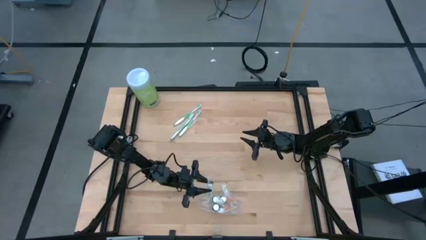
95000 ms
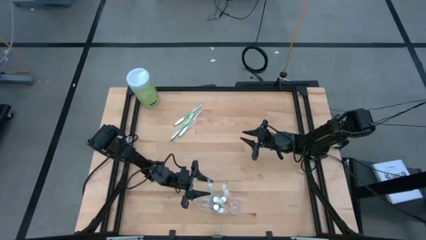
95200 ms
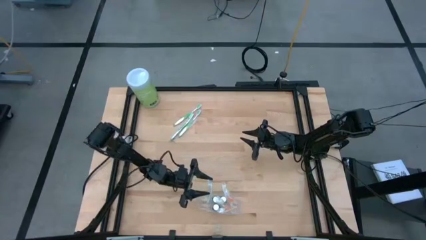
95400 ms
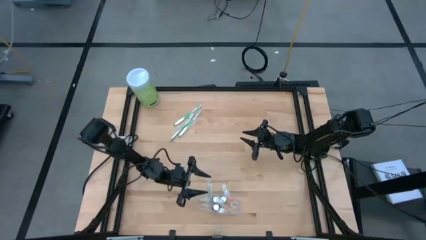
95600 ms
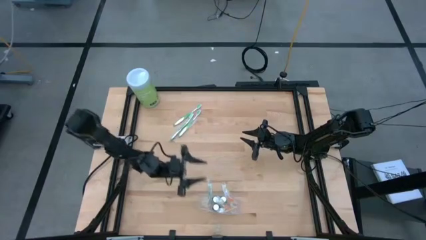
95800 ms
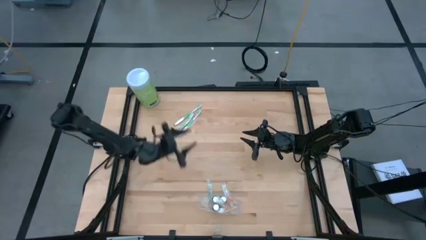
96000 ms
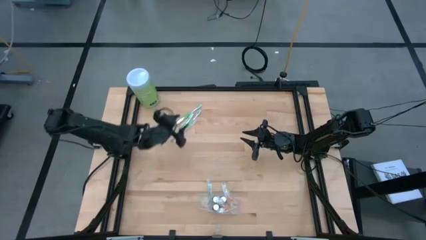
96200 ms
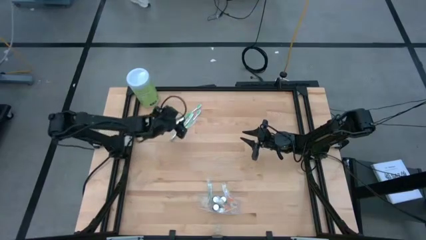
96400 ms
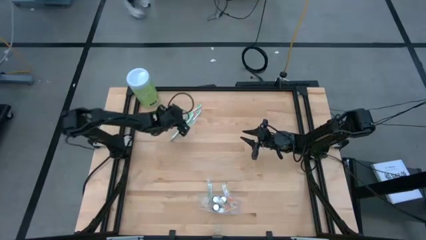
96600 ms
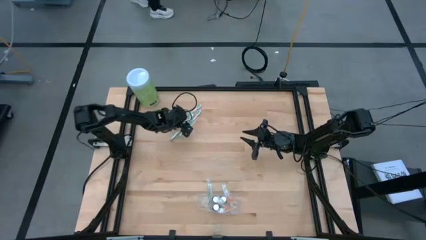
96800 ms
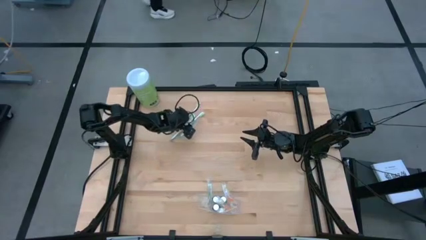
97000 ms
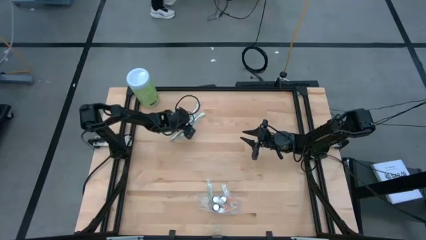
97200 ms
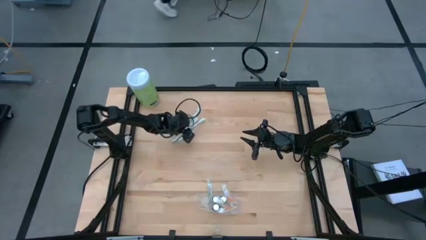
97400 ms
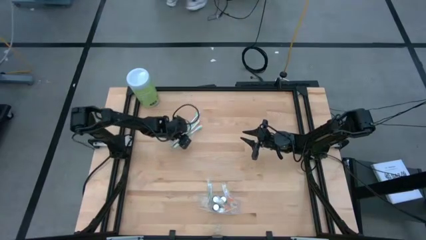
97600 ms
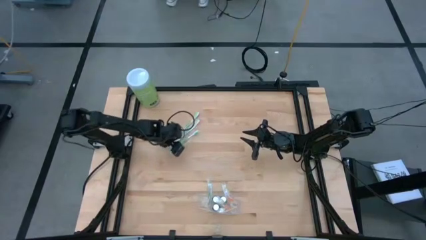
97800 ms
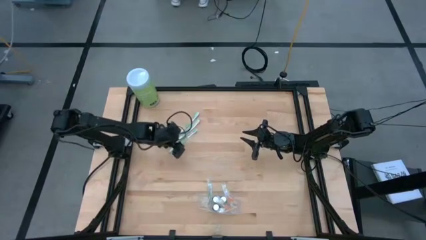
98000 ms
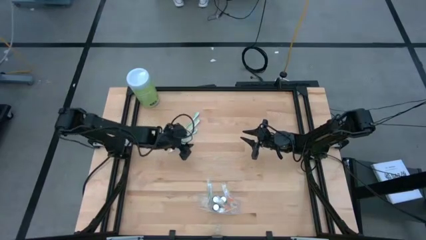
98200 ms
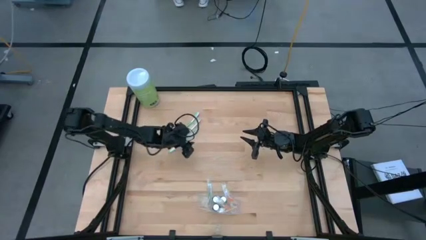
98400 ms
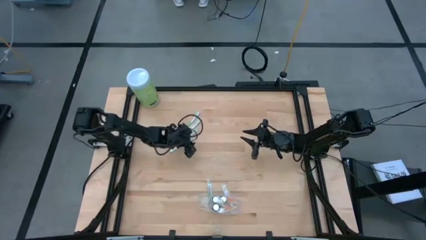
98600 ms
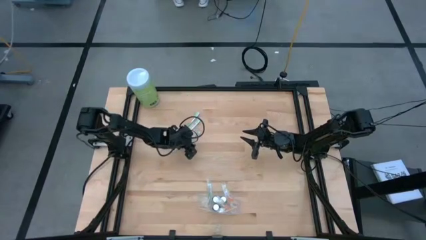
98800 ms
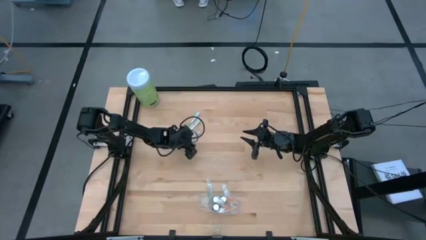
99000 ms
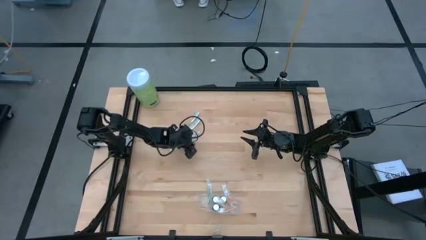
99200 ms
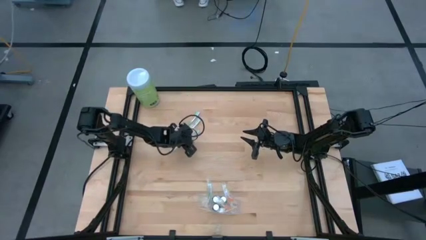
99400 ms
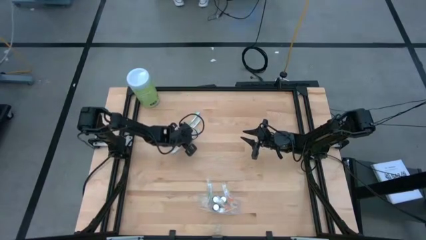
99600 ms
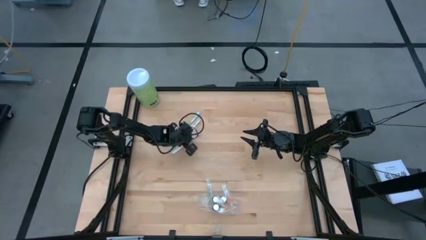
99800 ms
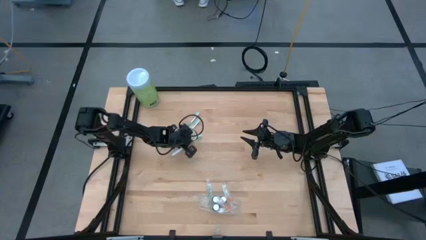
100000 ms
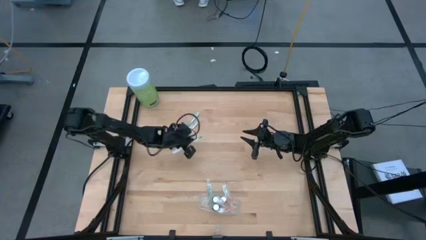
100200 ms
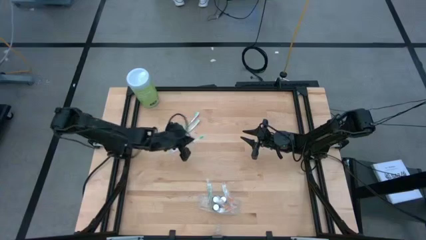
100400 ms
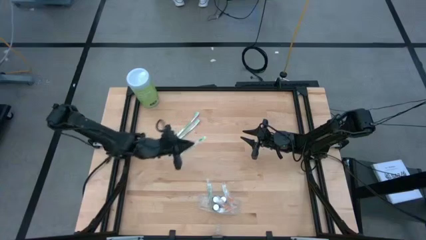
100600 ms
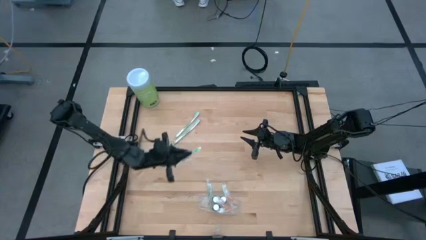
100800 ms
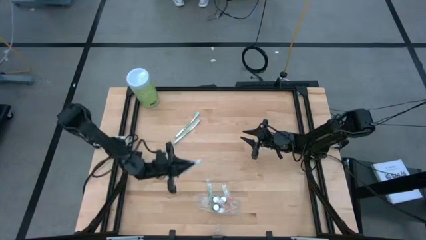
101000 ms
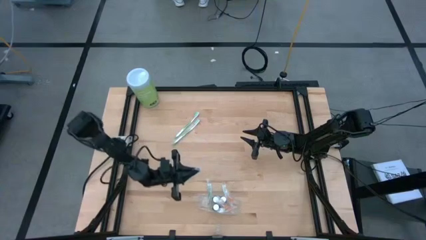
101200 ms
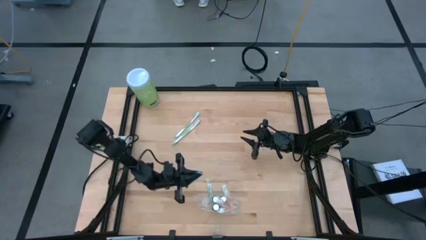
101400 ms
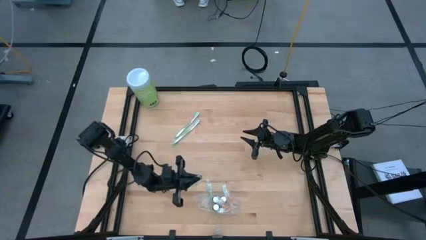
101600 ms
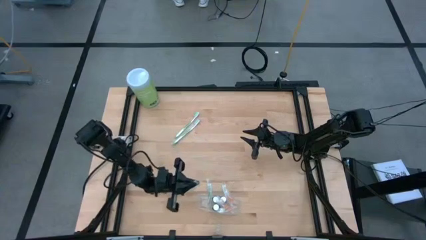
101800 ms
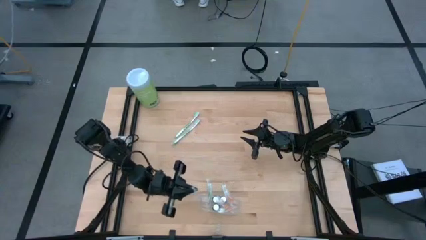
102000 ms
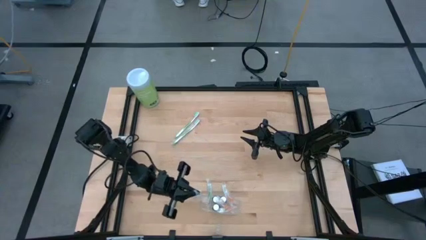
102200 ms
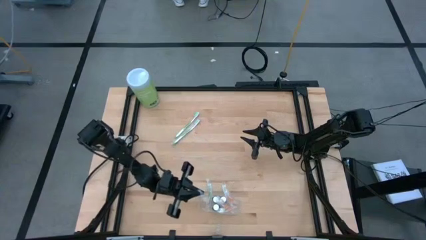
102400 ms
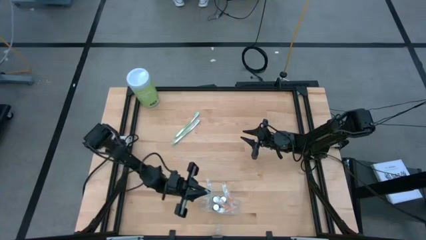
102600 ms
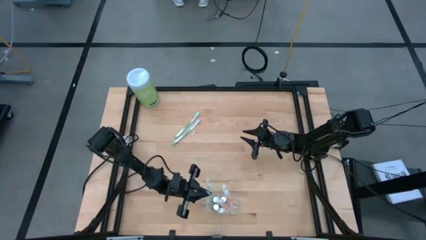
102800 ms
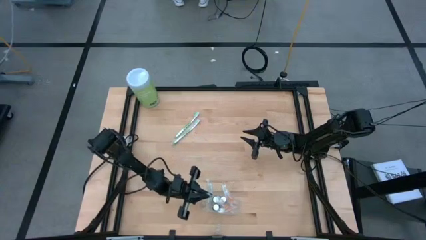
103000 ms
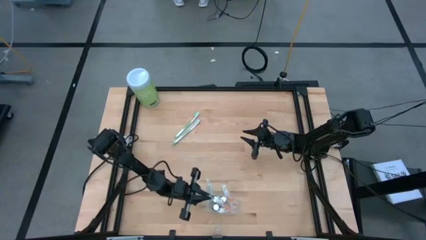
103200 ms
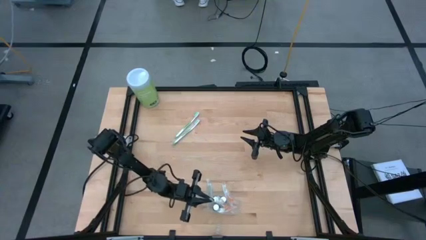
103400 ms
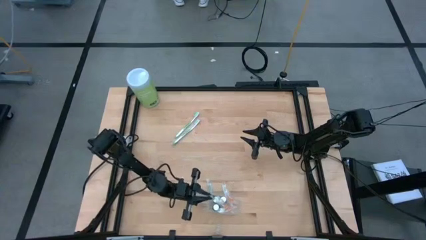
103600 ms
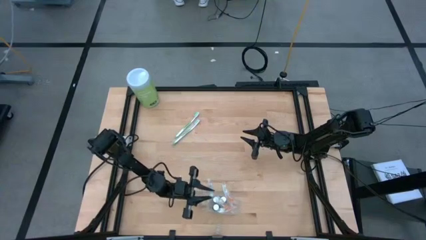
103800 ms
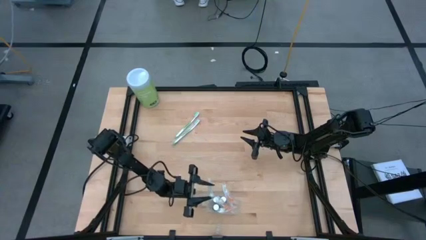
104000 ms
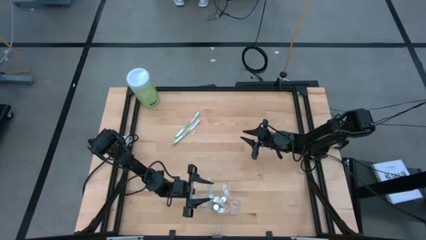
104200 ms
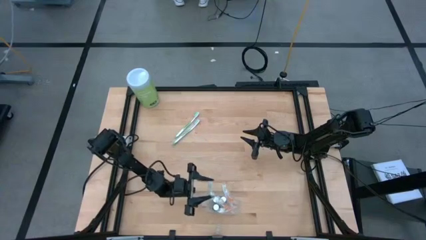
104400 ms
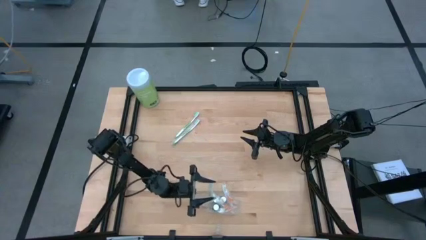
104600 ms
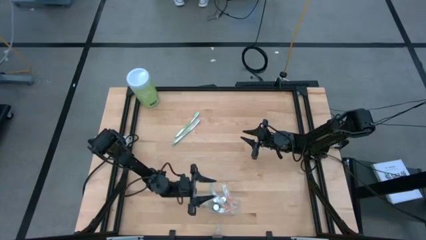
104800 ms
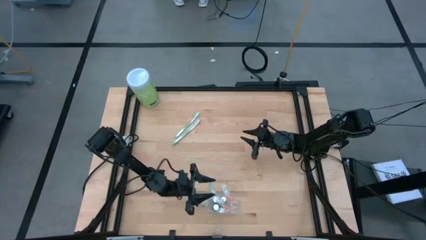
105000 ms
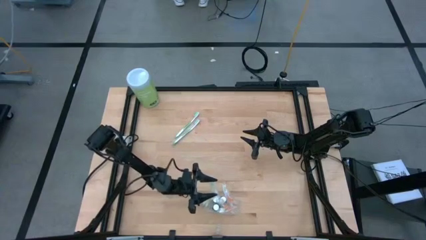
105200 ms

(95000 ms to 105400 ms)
Task: Pick & Place toothbrushing station
Put the green toothbrush into the transparent organizer

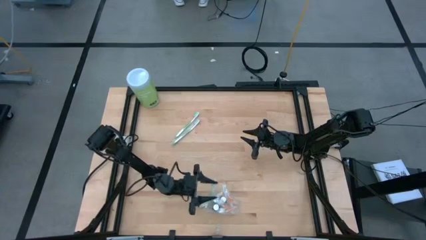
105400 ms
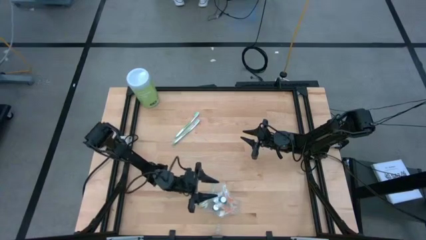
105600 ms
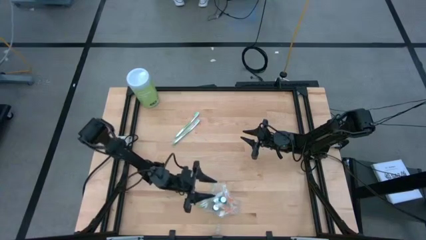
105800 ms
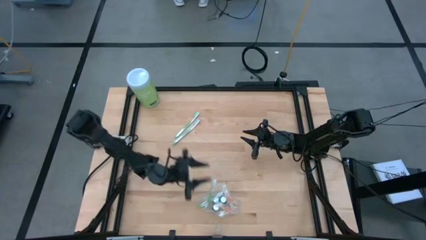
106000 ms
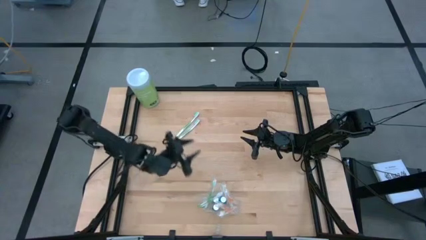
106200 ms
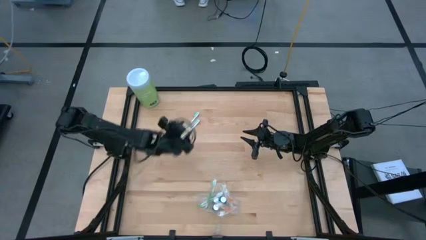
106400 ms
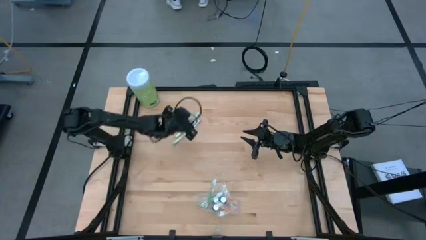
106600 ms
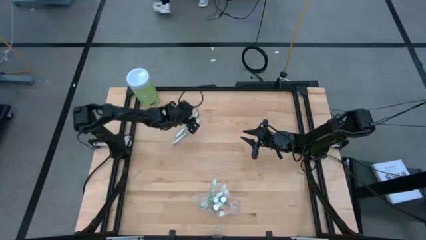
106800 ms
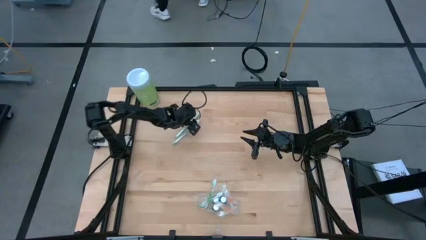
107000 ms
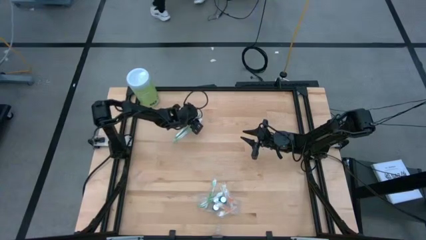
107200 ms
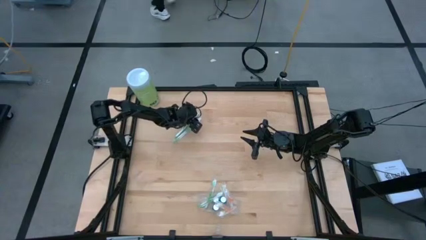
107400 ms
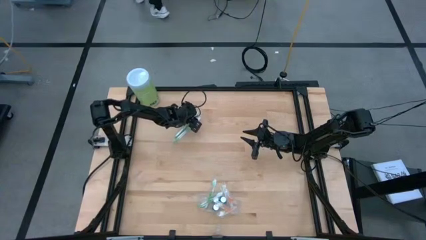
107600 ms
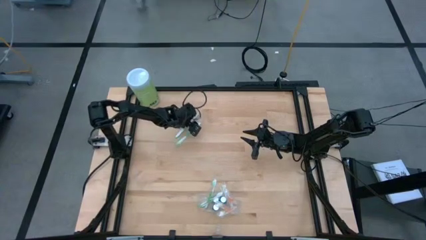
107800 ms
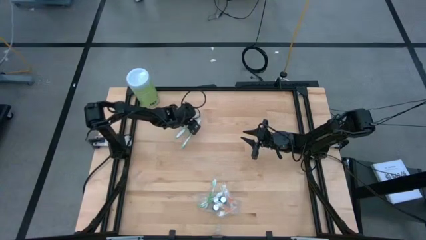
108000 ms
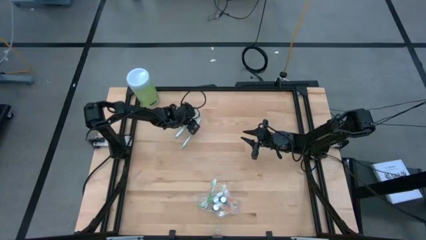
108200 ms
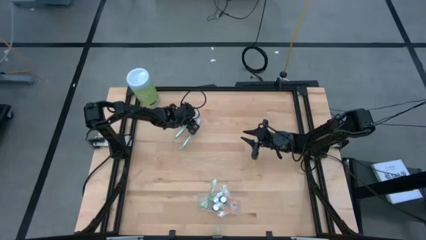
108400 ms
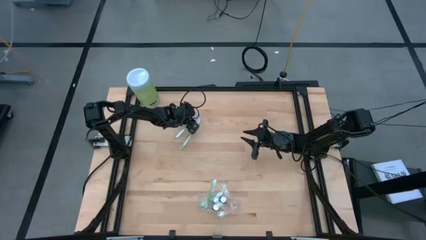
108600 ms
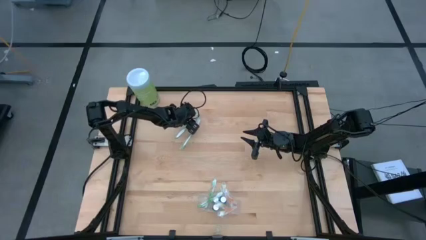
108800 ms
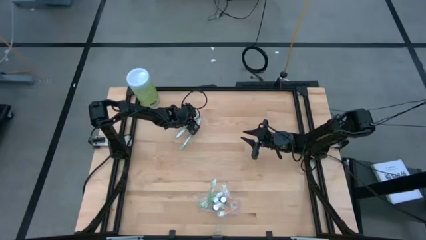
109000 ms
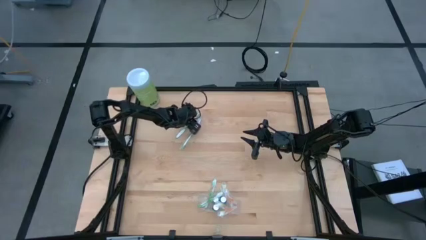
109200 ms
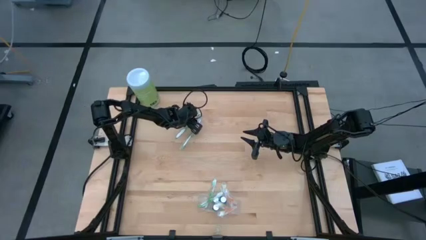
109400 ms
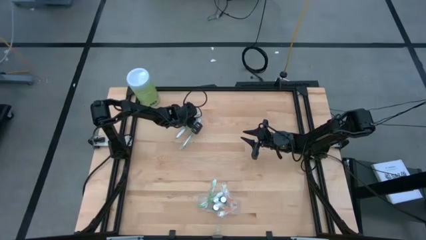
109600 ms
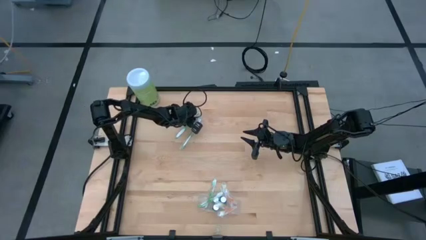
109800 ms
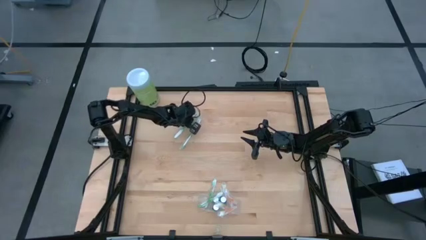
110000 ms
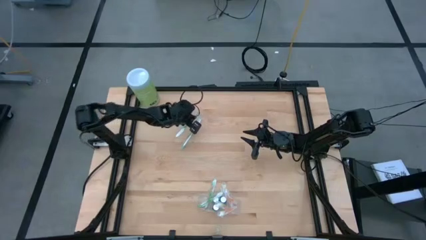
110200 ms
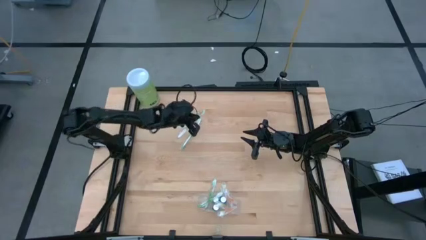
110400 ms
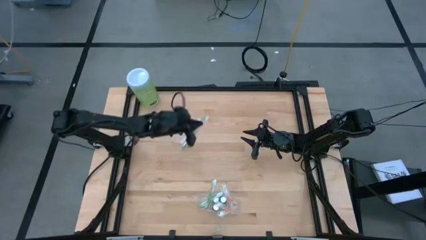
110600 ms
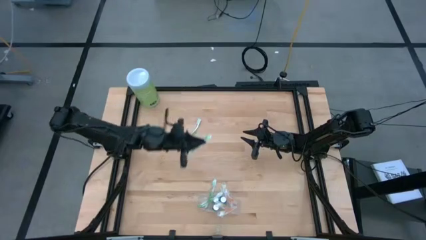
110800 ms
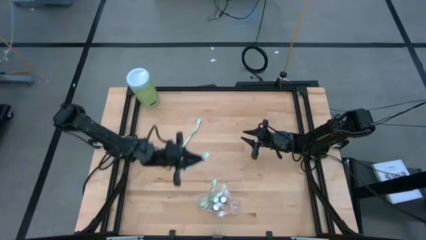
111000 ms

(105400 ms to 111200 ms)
Put the green toothbrush into the transparent organizer

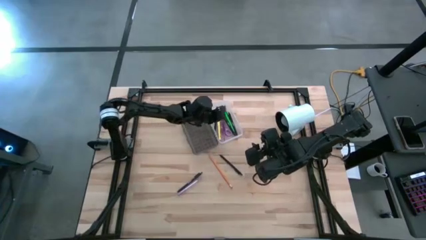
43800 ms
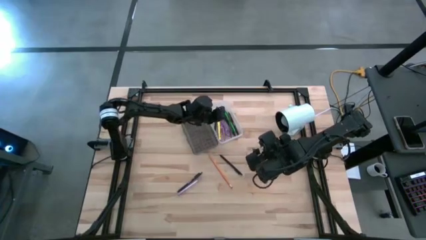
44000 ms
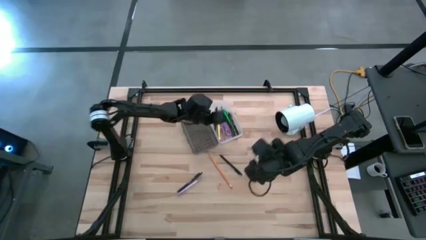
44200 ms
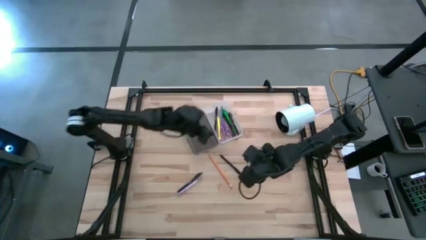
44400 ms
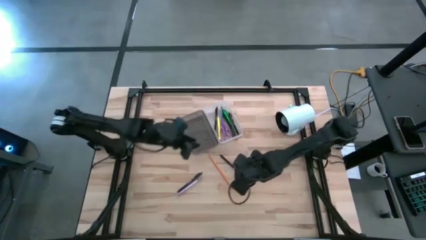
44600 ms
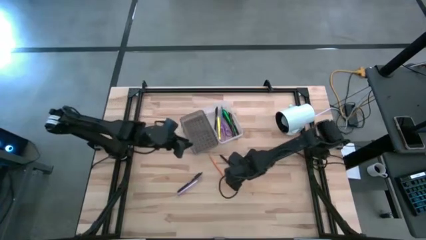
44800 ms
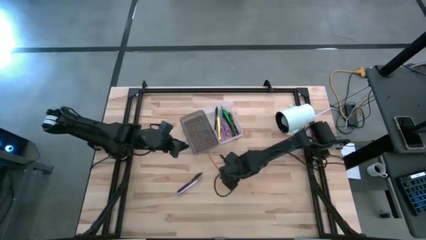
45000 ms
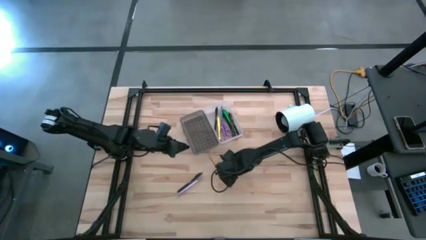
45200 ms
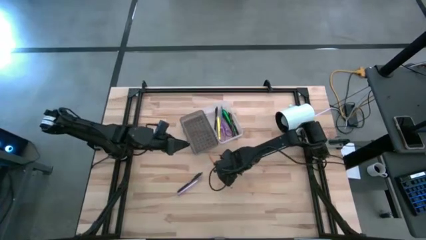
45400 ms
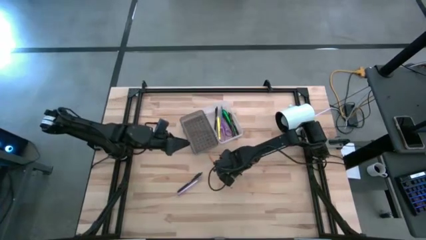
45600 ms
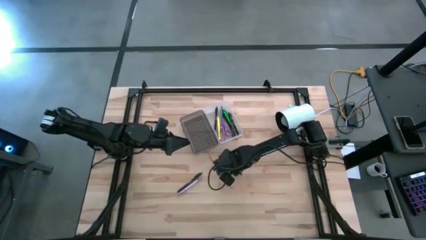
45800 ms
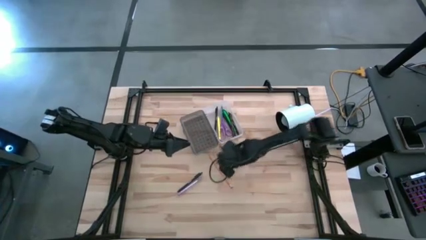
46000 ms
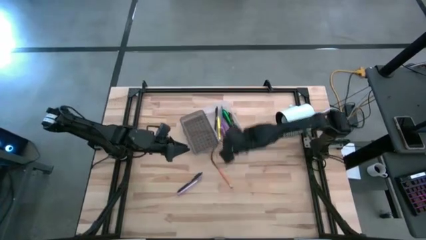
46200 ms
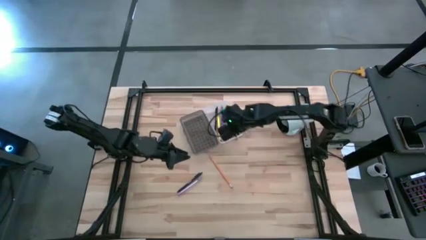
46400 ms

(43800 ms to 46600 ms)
Task: Pick & place school supplies into a supply box
Put the black pen into the black supply box
